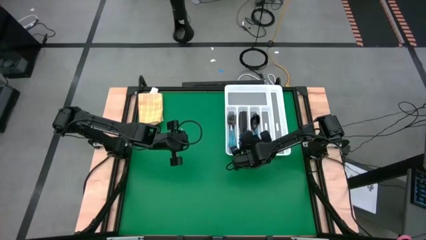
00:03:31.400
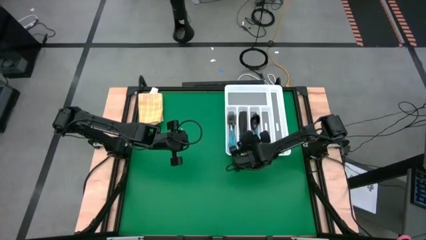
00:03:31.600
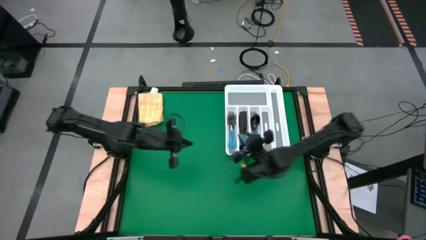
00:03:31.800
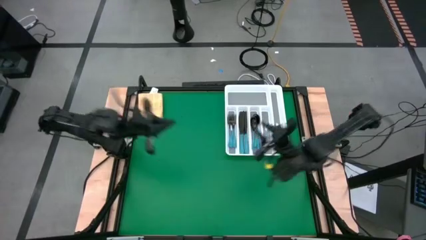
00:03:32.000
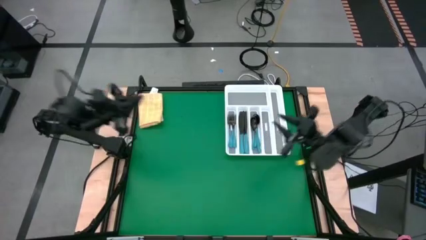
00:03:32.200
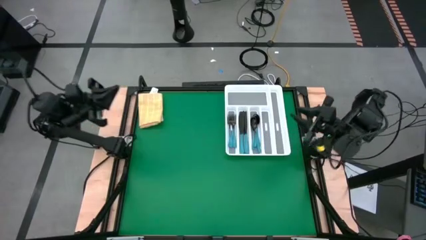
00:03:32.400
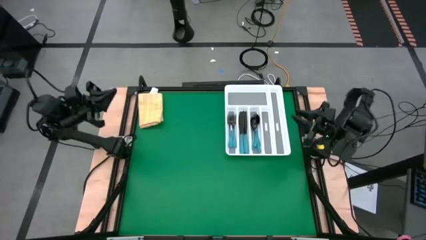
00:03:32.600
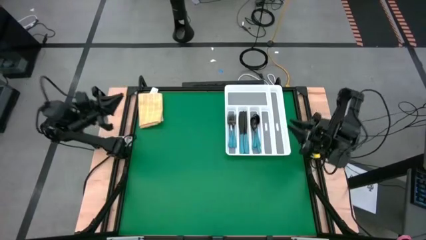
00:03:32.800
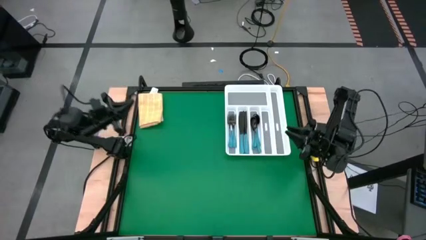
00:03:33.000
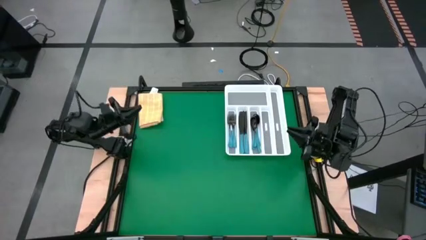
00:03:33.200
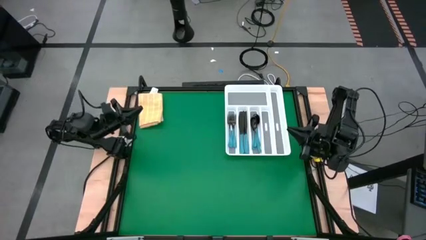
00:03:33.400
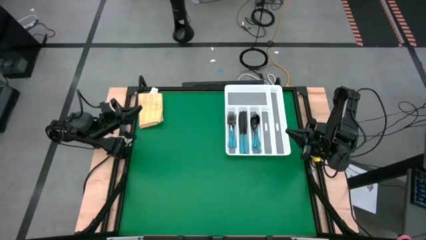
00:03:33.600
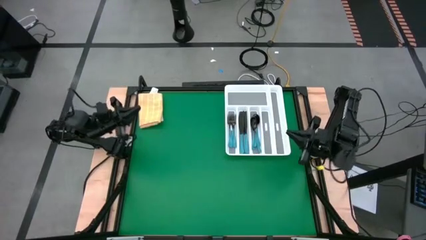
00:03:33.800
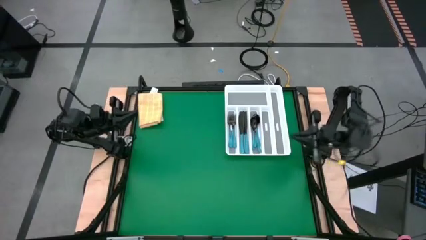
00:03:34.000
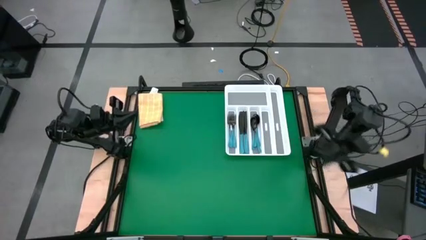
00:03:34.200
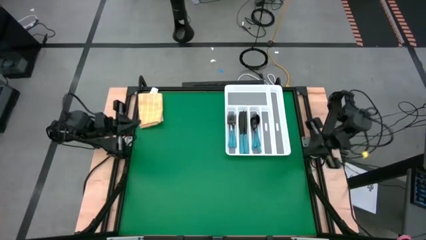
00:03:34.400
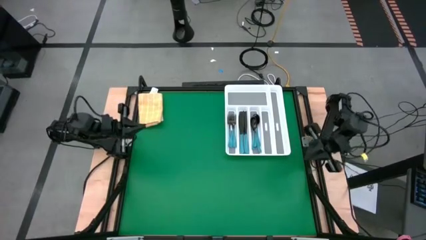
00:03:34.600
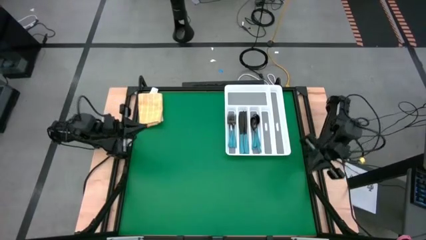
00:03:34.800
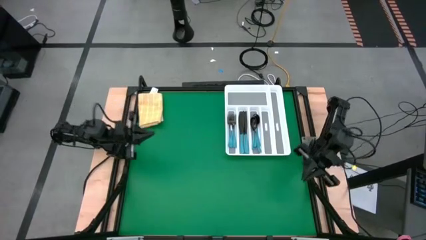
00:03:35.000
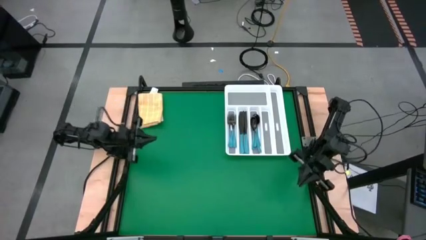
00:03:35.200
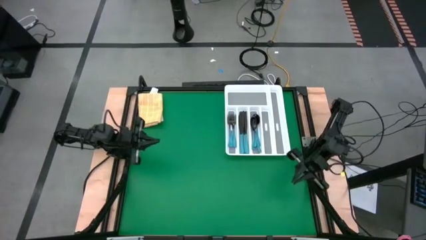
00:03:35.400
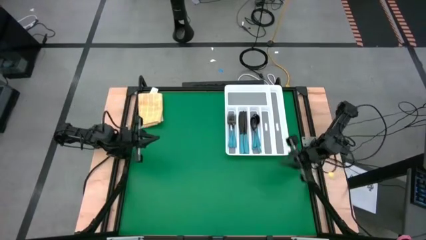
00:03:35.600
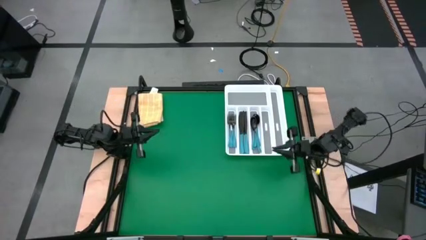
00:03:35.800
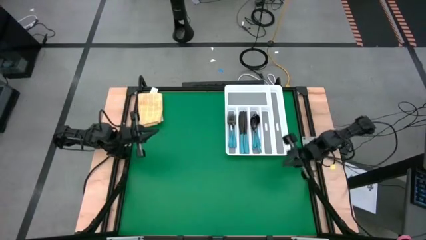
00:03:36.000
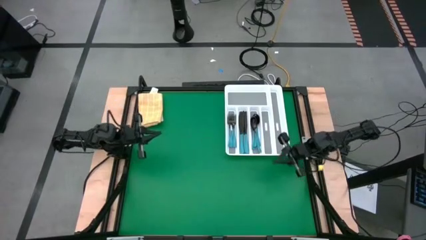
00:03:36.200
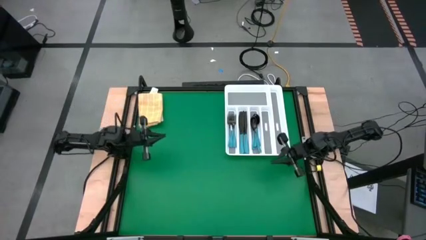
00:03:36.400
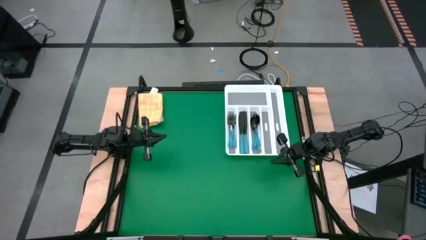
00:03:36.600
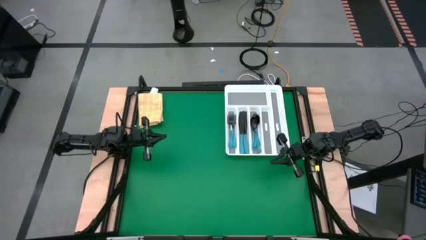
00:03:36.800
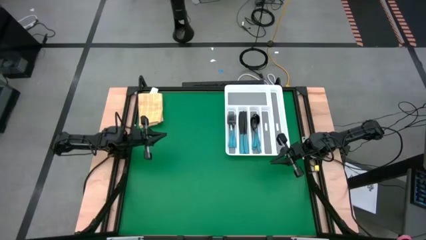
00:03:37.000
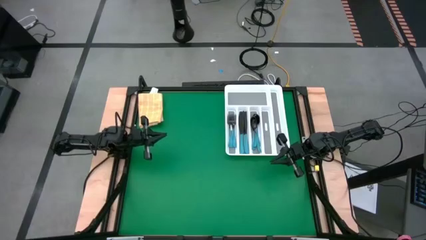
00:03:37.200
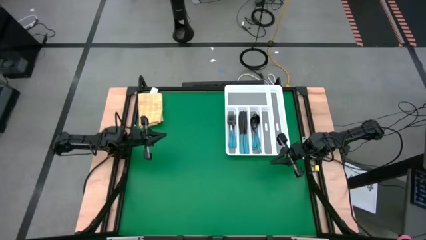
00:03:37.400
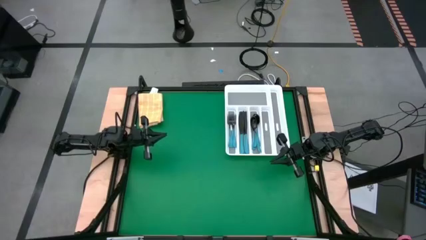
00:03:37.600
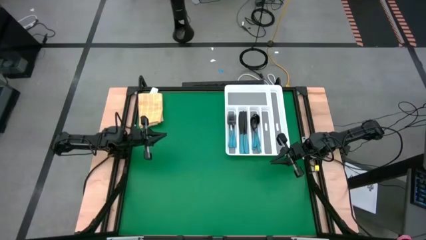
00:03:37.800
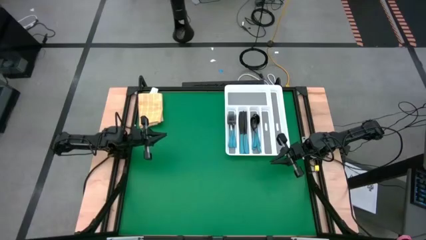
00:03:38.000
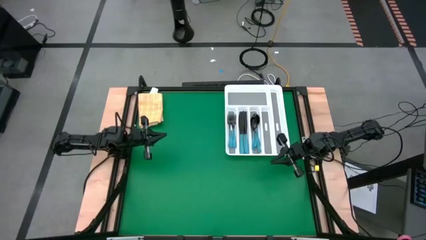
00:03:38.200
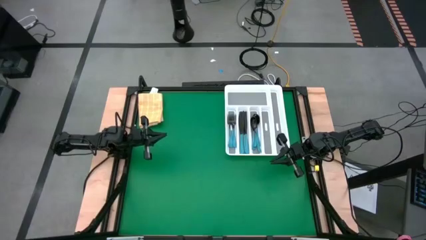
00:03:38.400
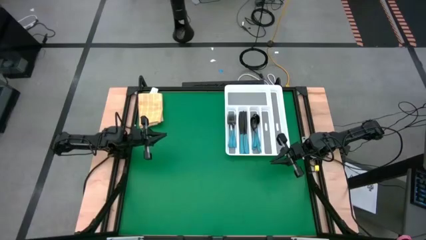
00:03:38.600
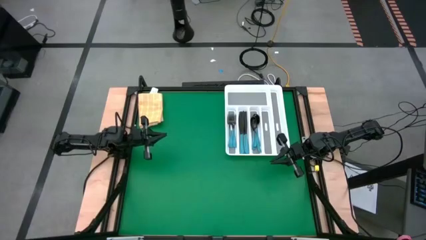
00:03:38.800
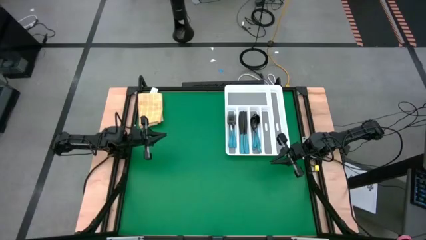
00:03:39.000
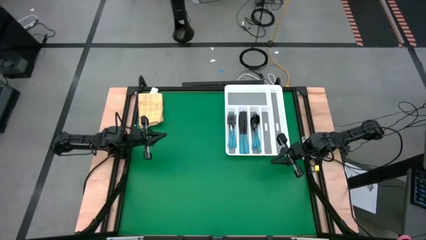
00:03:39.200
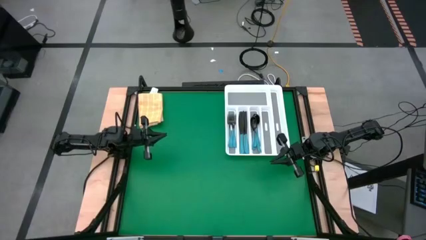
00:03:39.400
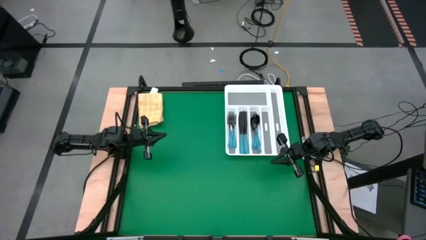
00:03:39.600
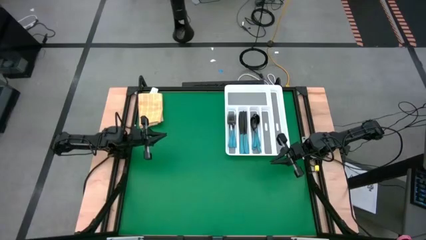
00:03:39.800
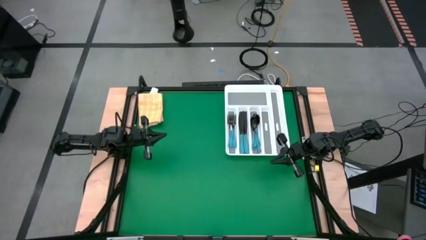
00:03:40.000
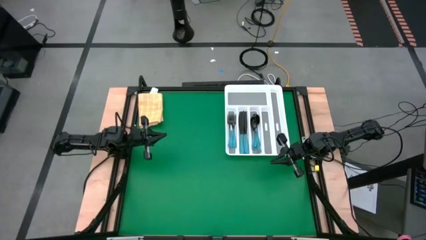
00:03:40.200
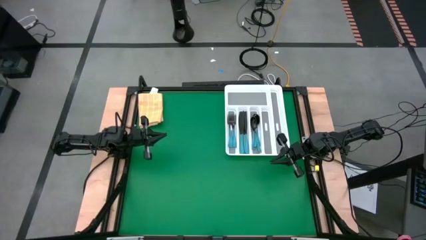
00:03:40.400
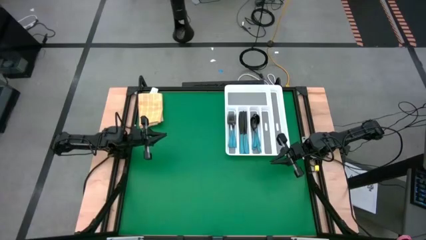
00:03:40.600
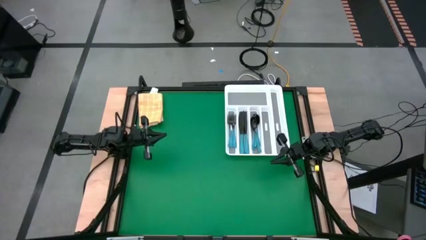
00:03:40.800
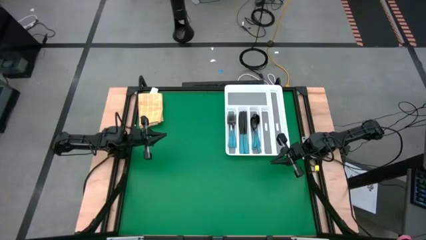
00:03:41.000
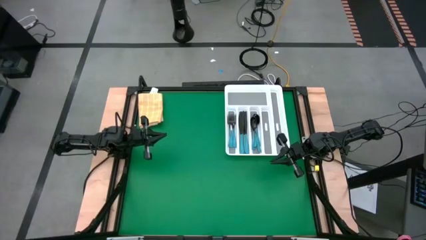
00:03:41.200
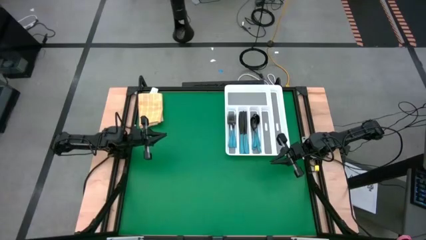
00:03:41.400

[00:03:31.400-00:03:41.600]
Task: Sort silverware
Return to Home Position

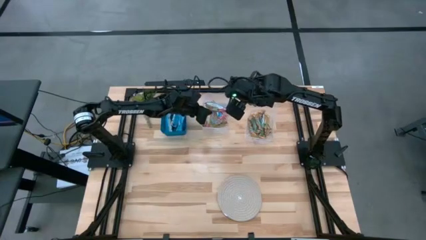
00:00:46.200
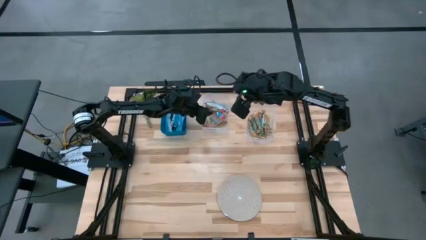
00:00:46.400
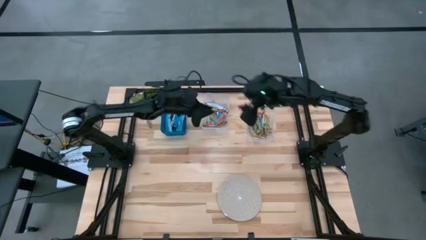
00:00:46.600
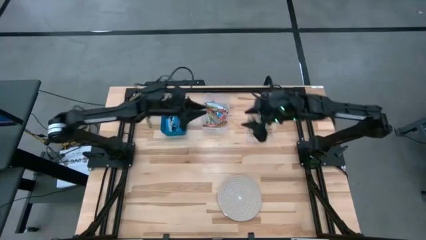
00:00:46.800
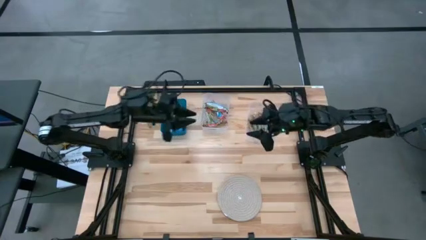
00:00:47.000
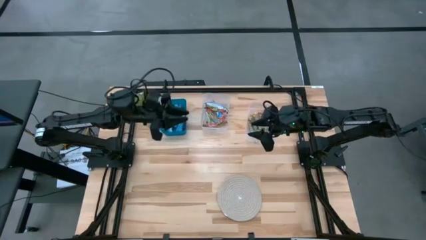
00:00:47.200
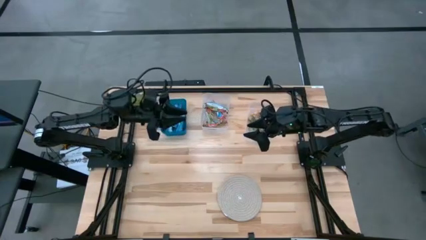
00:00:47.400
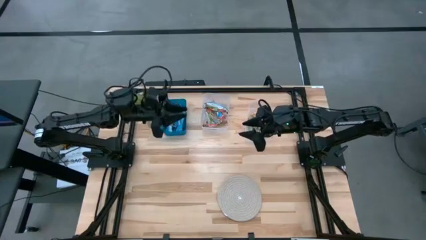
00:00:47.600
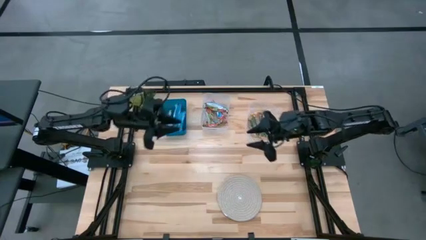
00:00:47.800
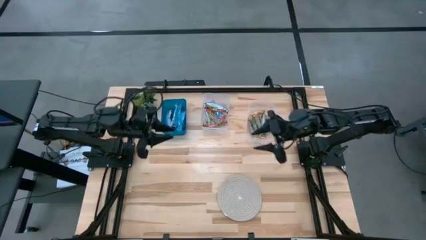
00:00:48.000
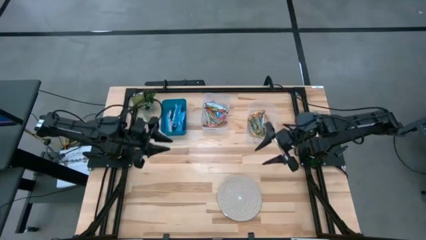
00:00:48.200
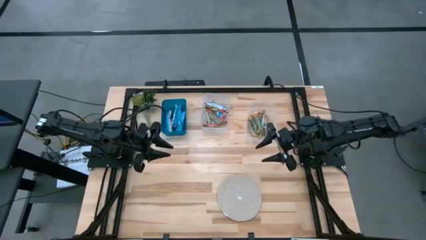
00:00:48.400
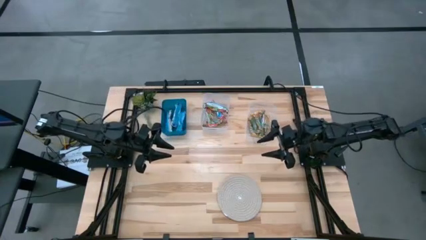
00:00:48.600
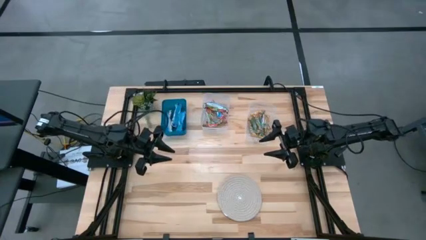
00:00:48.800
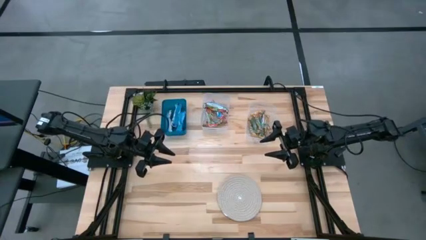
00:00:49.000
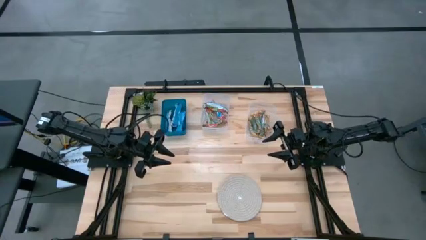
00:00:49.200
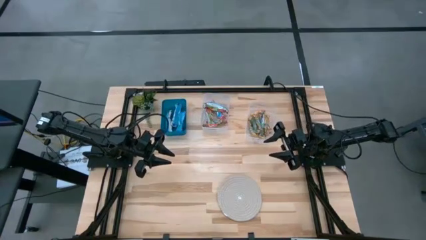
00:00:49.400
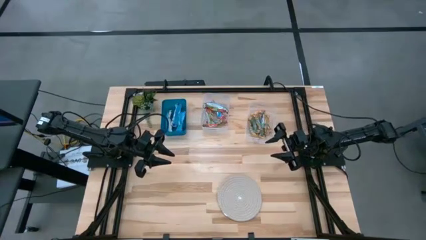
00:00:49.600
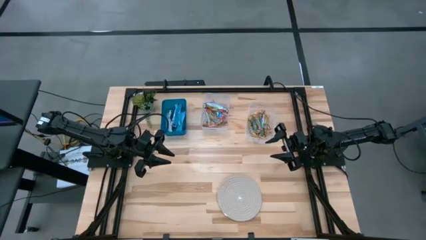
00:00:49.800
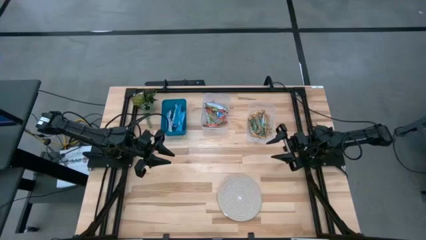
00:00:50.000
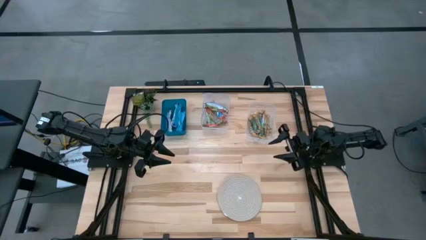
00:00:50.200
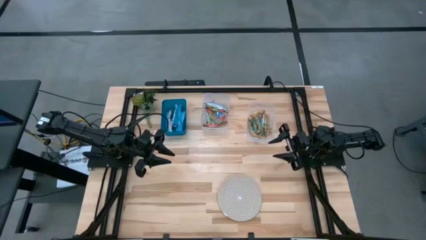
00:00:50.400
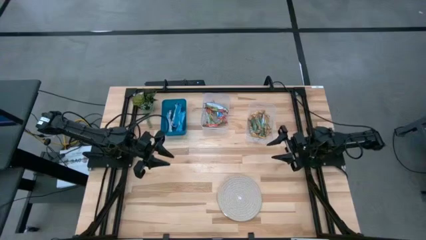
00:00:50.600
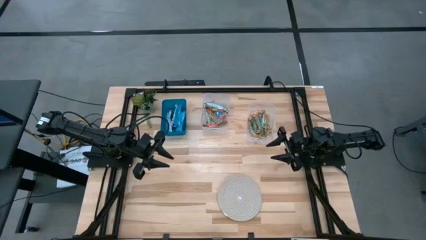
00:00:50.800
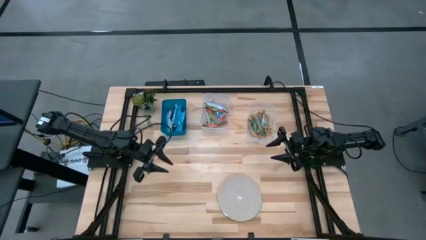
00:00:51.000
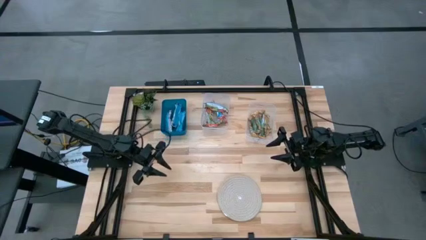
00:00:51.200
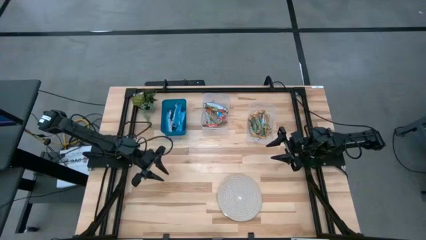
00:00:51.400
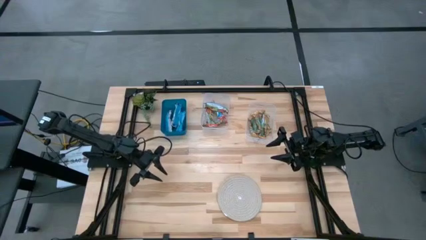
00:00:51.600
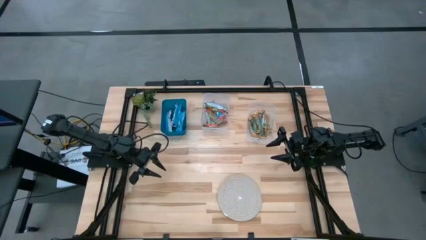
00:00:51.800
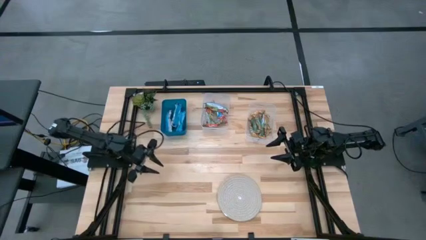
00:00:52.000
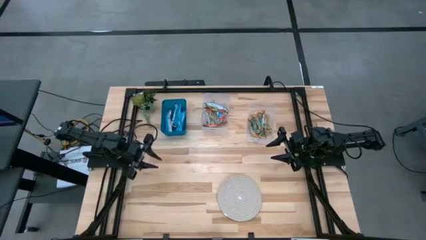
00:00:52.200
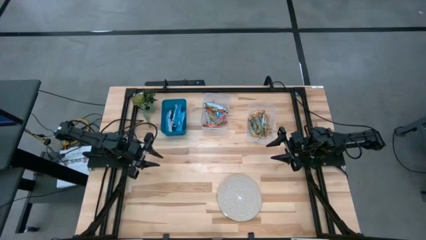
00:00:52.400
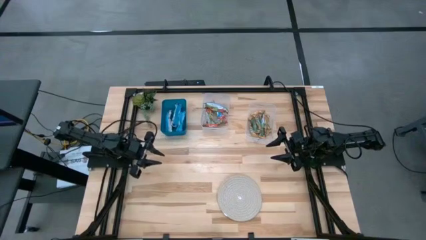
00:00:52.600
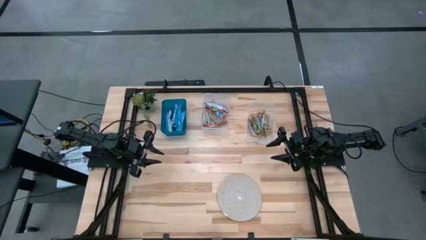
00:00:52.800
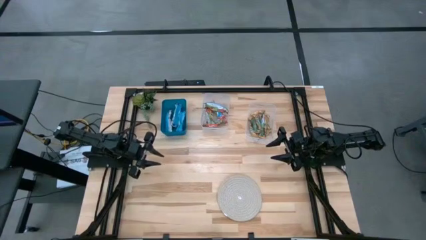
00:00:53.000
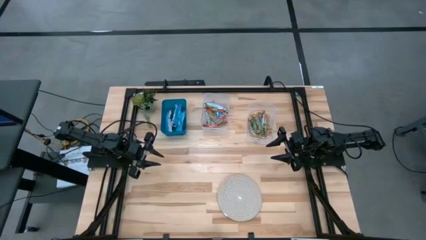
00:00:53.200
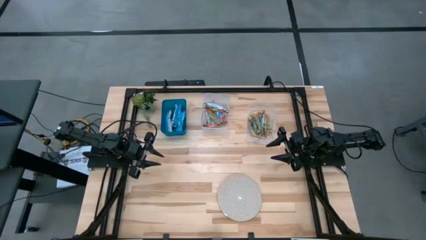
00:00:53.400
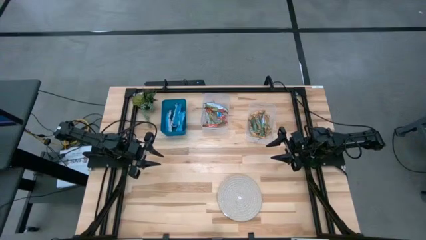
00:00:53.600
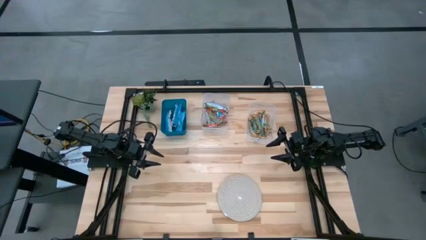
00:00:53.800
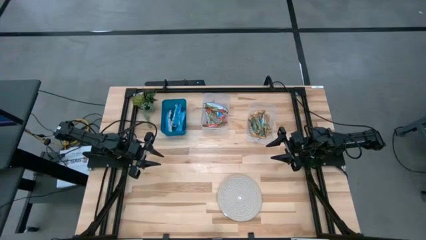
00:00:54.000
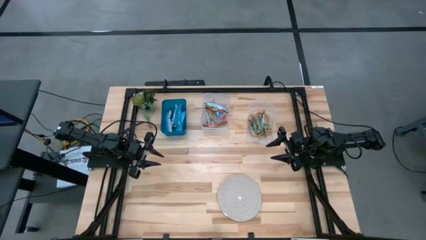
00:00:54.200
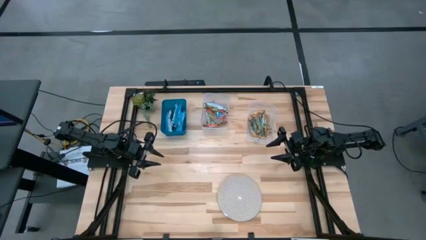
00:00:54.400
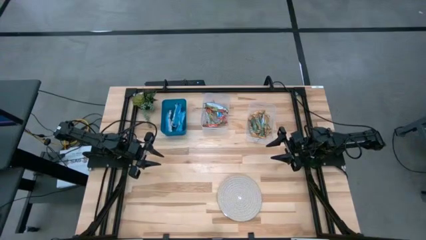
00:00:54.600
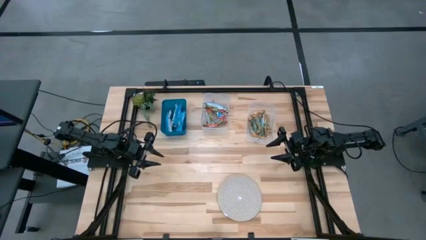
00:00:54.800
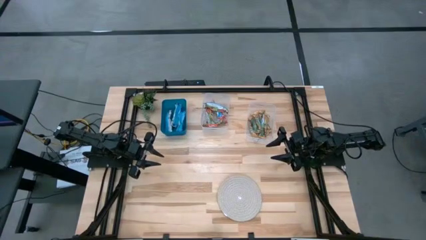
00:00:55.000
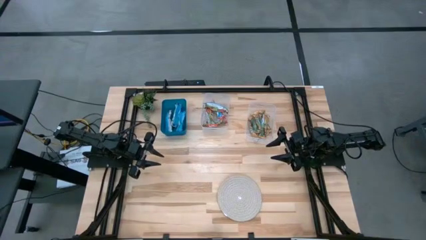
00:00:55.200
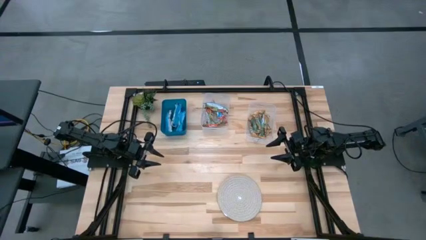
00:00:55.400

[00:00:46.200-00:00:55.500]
Task: Pick and place Granola Bars by type
Return to Home Position
